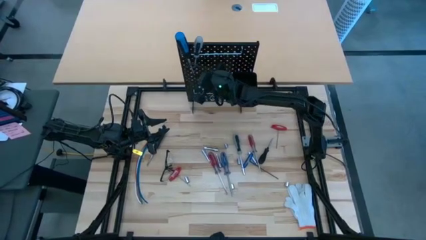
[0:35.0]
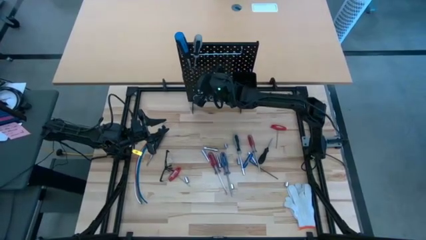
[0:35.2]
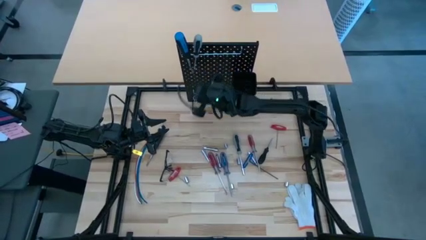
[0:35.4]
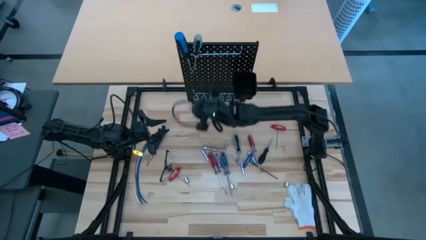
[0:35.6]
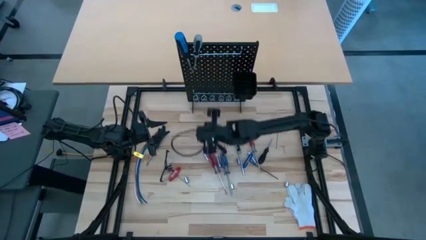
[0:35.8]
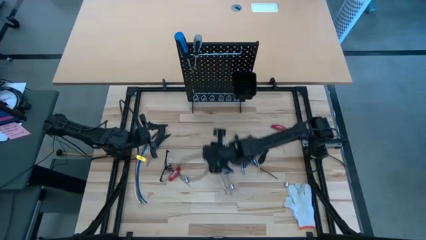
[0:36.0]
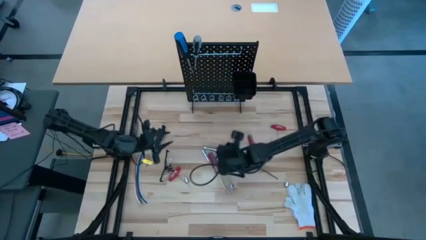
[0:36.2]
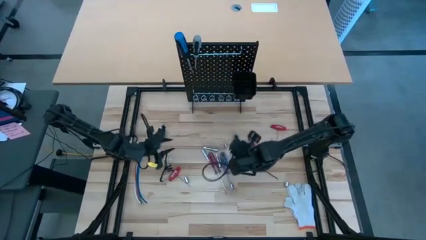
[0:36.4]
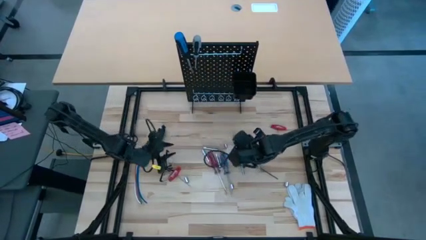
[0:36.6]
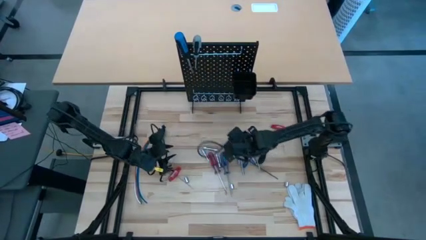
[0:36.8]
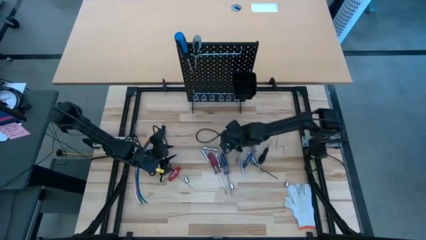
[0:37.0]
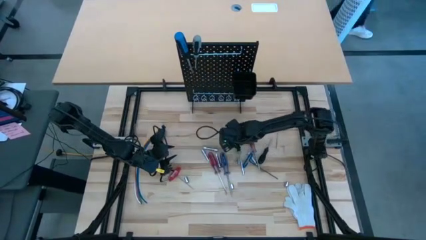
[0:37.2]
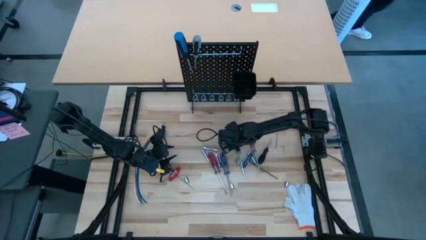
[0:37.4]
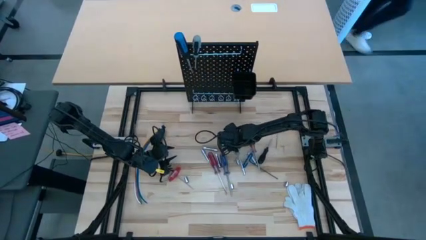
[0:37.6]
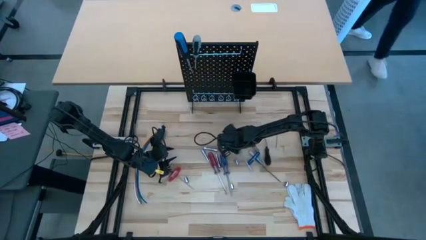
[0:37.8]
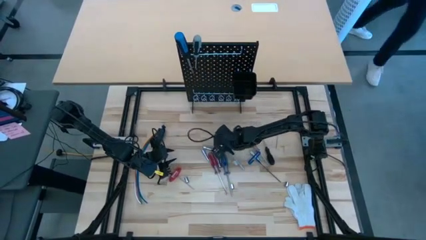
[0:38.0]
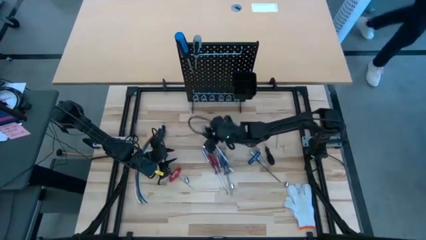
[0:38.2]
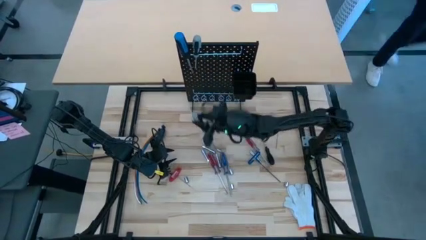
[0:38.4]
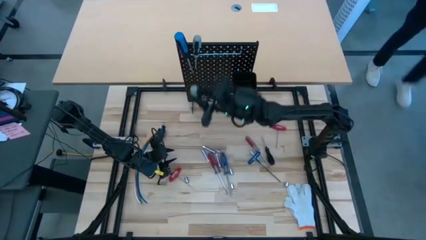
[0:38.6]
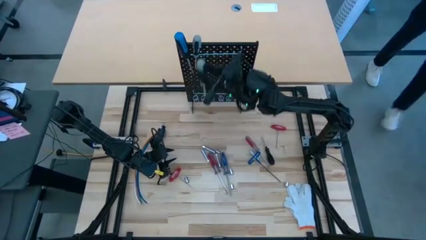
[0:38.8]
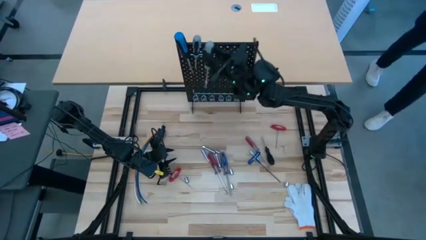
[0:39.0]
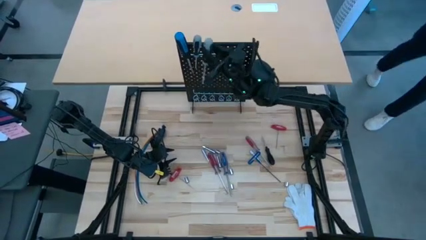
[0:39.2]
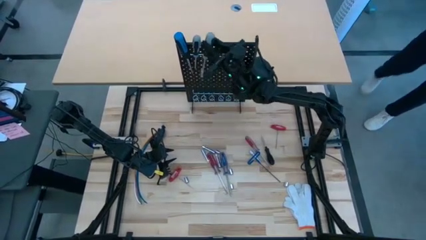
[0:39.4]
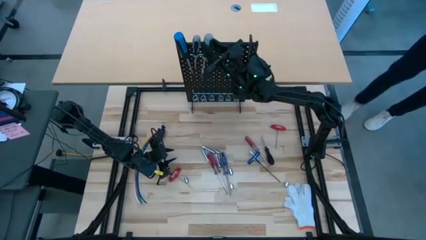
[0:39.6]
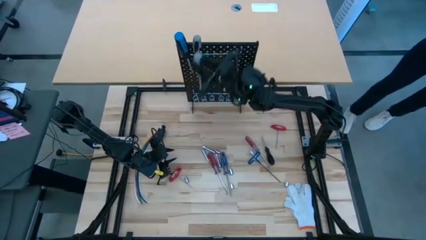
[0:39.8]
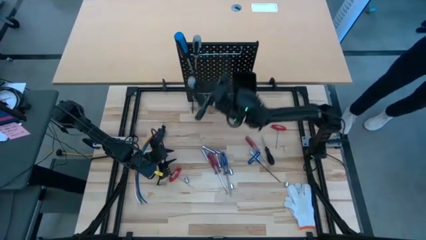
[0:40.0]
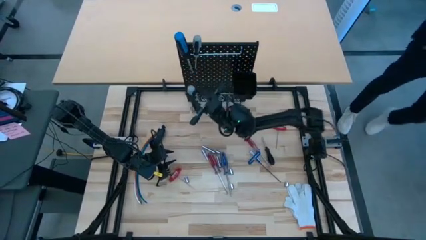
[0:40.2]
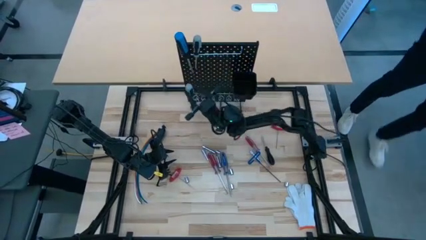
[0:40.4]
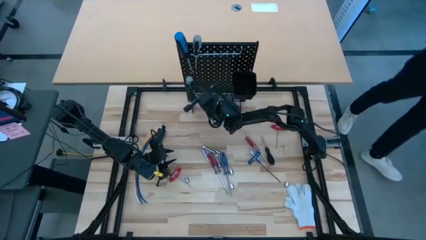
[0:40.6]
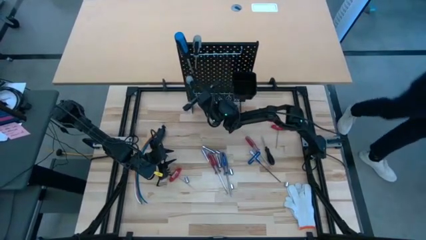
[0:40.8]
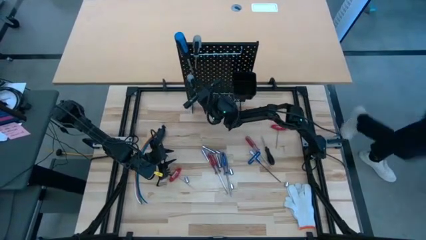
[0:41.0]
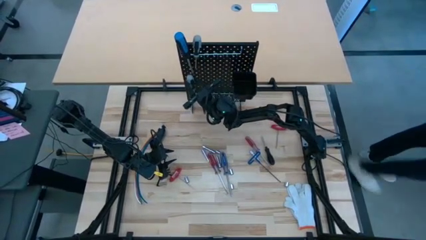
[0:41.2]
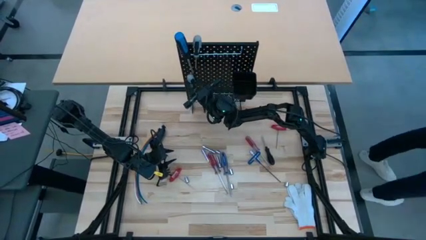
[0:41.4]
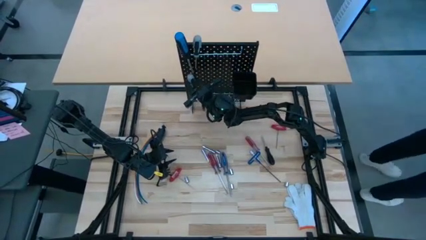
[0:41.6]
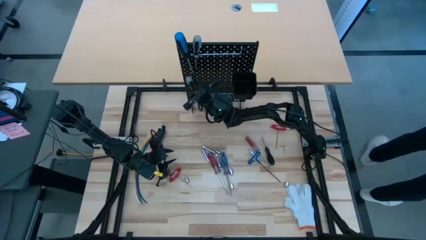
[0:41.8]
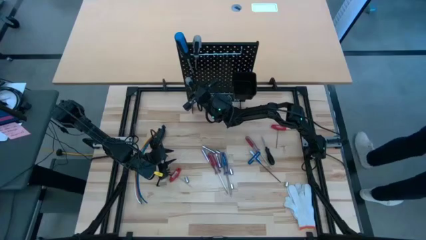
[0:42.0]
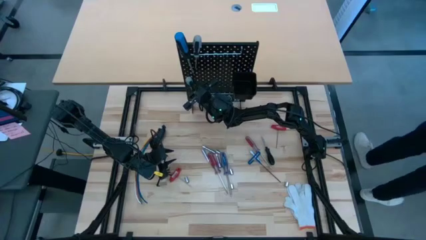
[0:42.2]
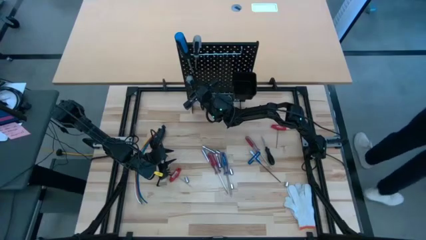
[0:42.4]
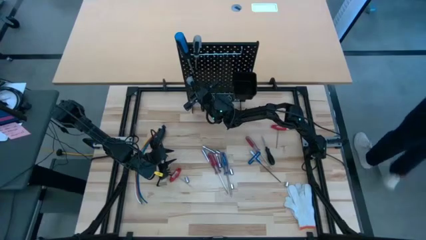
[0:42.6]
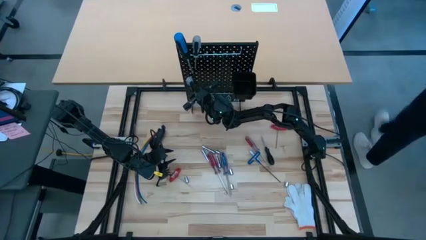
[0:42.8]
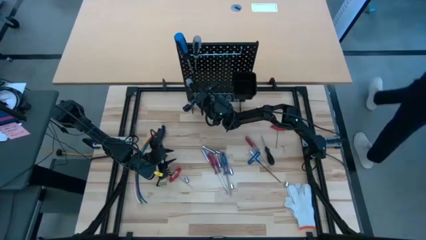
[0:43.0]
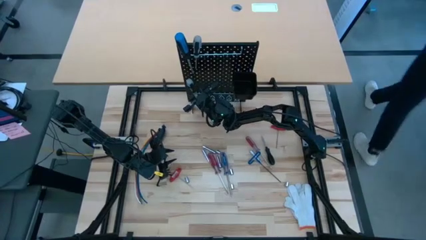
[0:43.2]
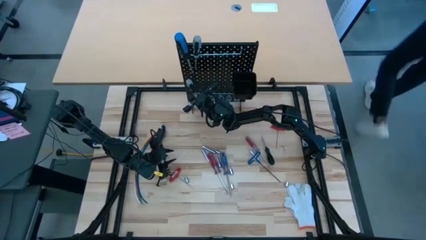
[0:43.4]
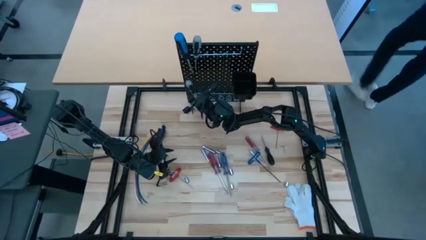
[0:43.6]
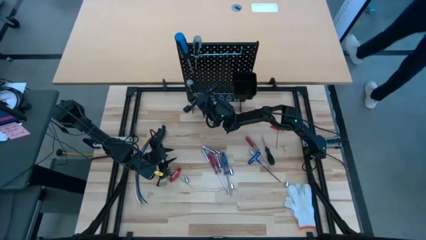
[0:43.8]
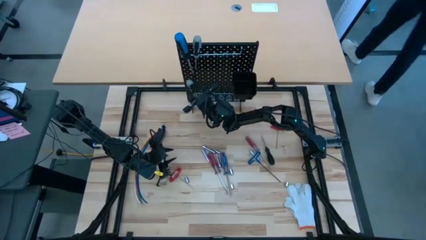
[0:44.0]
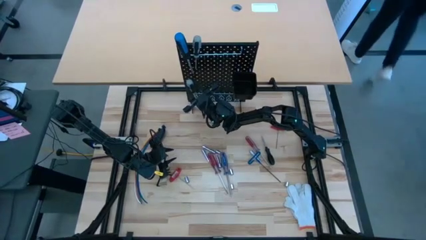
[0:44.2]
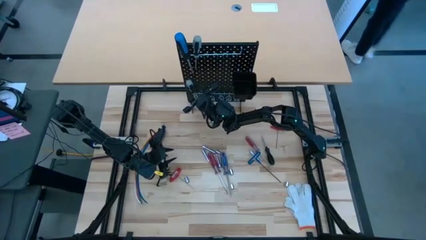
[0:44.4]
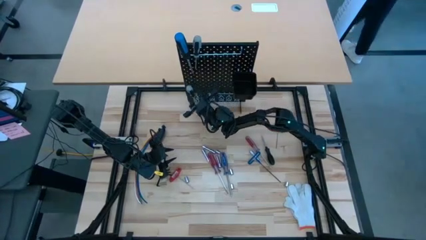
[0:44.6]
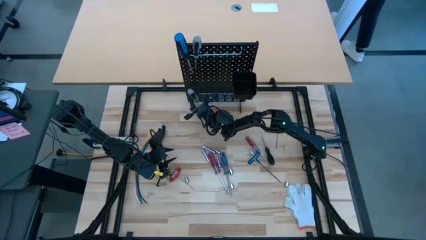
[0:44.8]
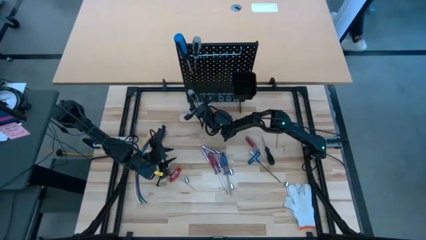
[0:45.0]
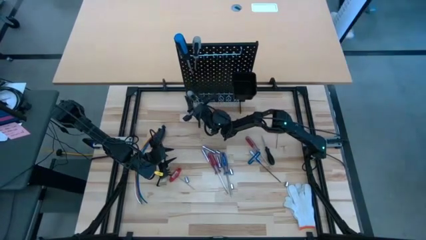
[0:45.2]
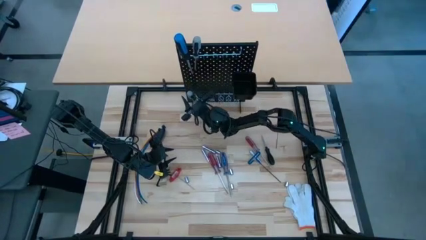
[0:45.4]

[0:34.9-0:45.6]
Task: Hang tools onto peg board
Hang the gray screwdriver on the pegboard
